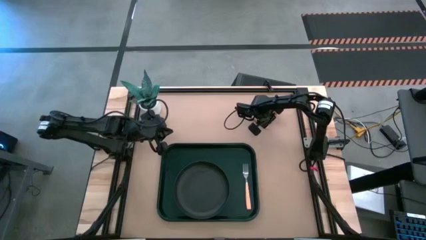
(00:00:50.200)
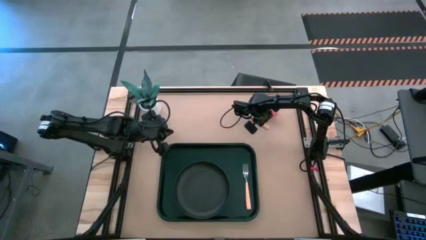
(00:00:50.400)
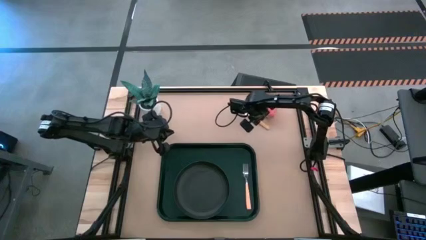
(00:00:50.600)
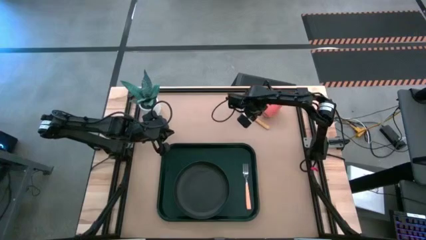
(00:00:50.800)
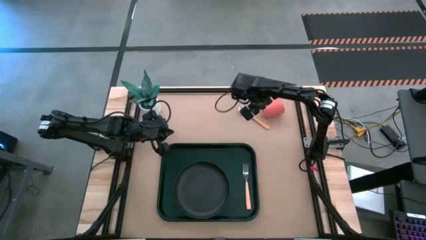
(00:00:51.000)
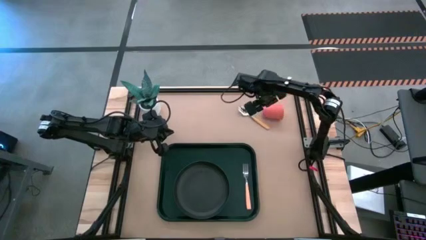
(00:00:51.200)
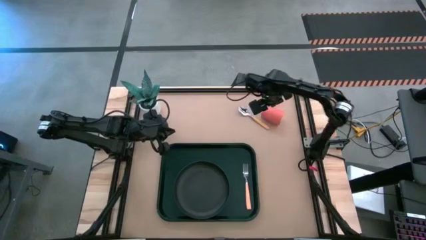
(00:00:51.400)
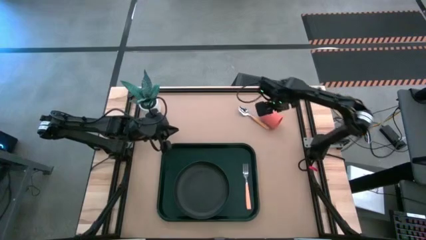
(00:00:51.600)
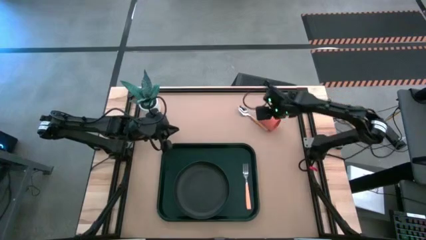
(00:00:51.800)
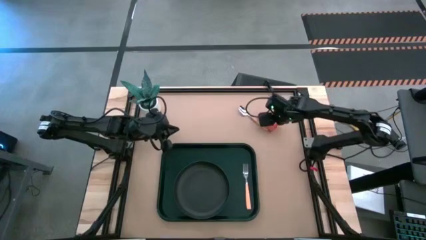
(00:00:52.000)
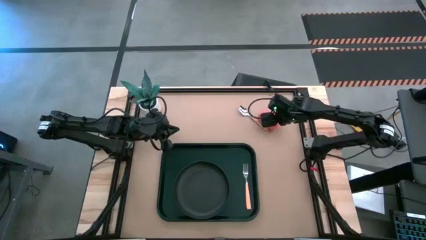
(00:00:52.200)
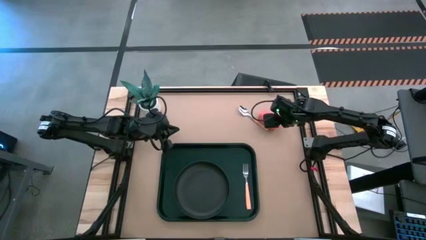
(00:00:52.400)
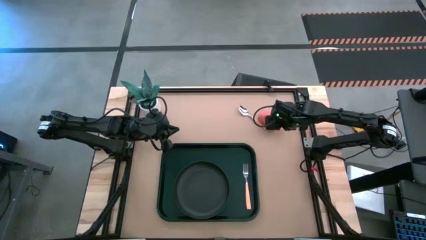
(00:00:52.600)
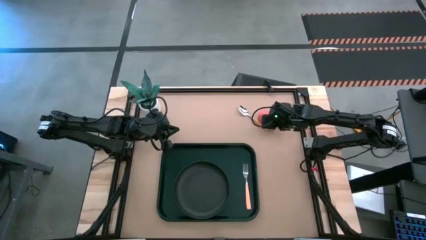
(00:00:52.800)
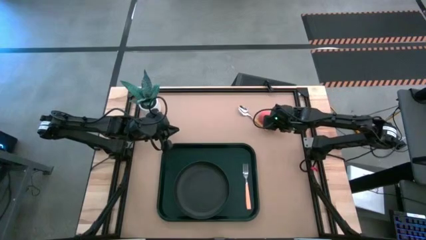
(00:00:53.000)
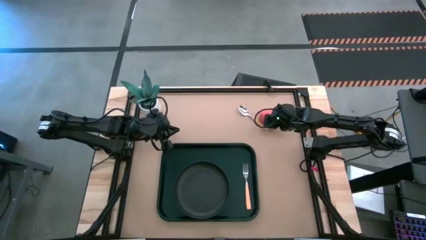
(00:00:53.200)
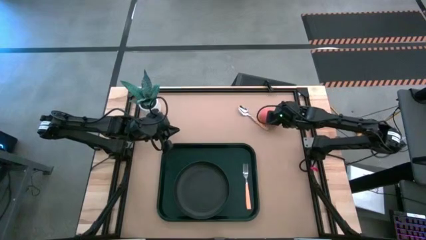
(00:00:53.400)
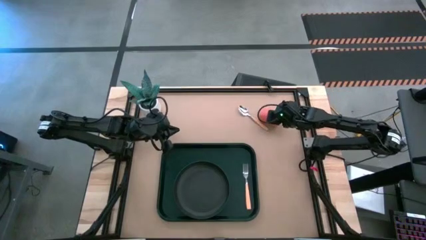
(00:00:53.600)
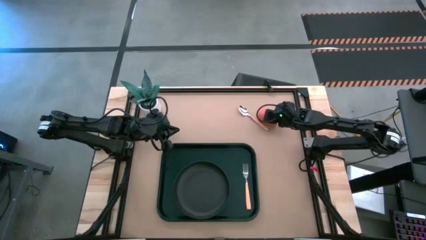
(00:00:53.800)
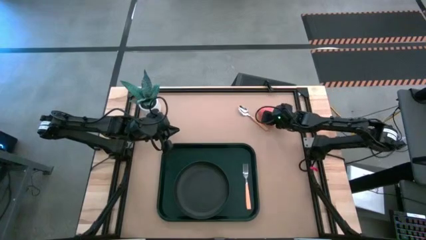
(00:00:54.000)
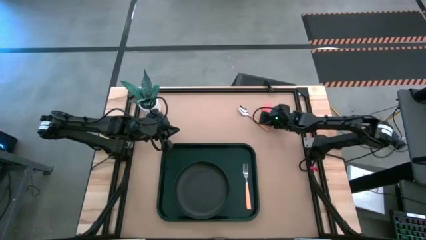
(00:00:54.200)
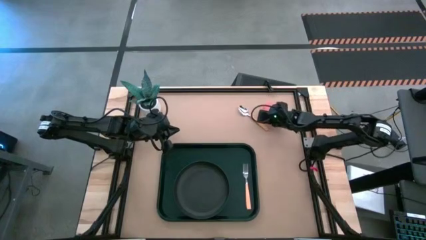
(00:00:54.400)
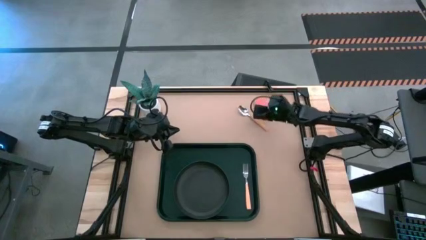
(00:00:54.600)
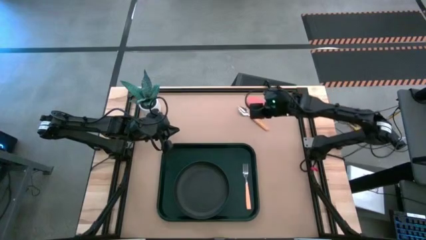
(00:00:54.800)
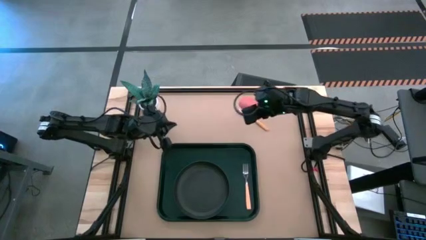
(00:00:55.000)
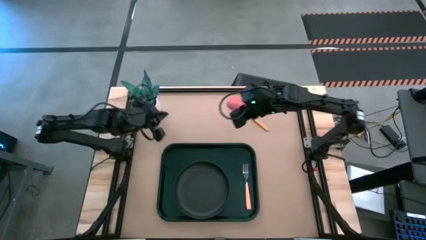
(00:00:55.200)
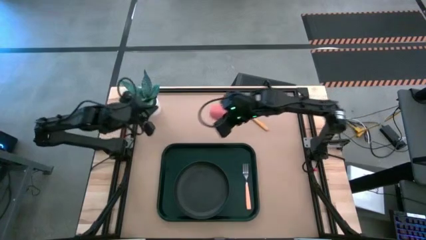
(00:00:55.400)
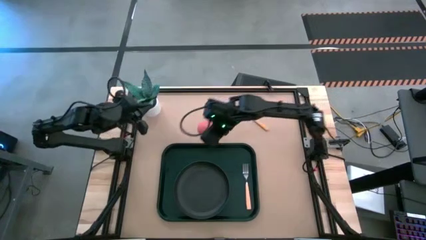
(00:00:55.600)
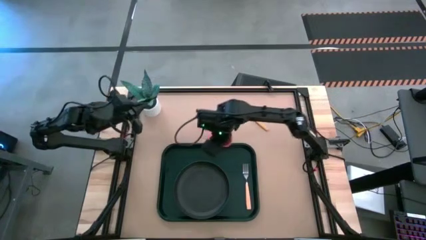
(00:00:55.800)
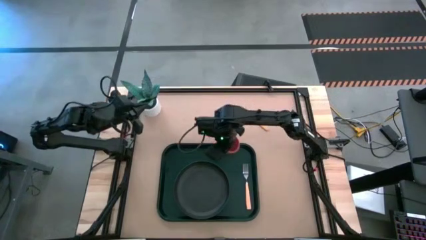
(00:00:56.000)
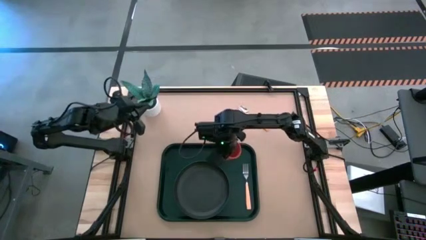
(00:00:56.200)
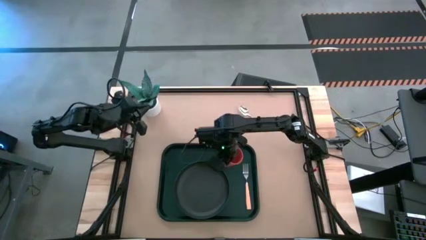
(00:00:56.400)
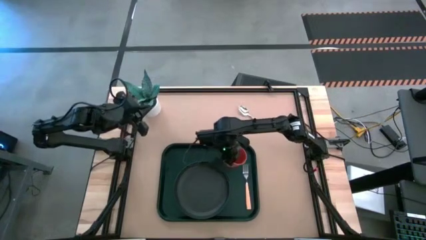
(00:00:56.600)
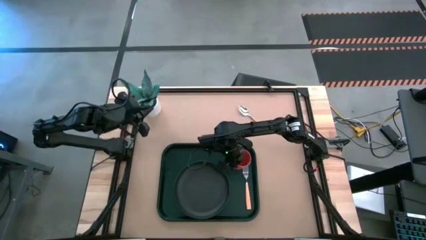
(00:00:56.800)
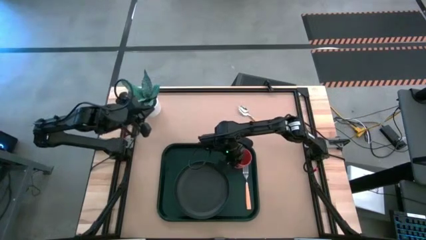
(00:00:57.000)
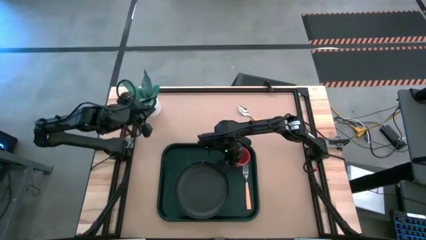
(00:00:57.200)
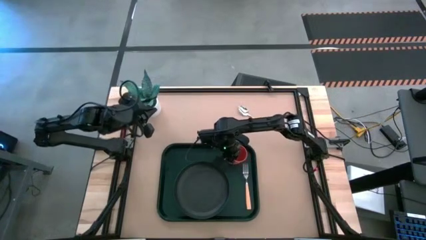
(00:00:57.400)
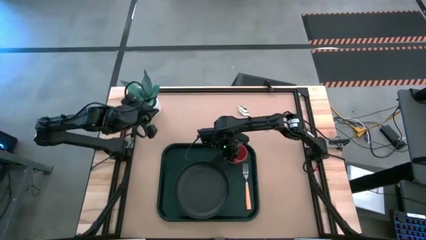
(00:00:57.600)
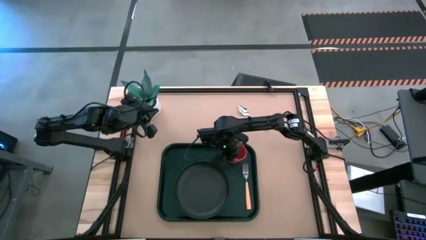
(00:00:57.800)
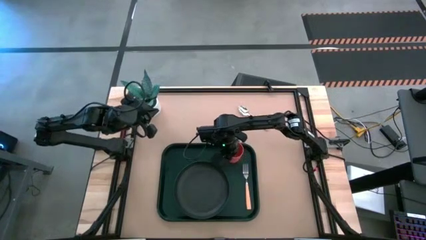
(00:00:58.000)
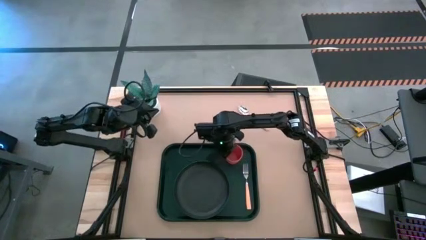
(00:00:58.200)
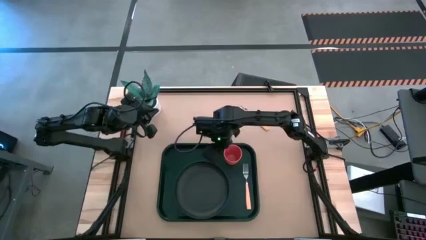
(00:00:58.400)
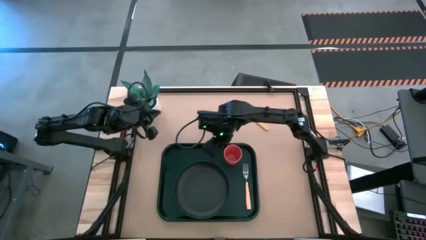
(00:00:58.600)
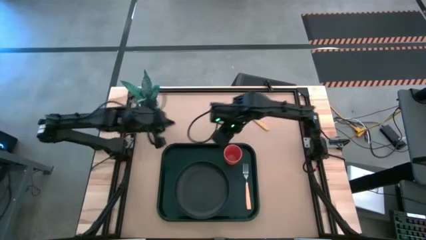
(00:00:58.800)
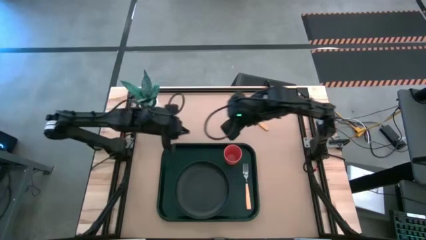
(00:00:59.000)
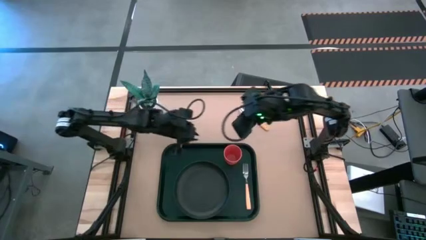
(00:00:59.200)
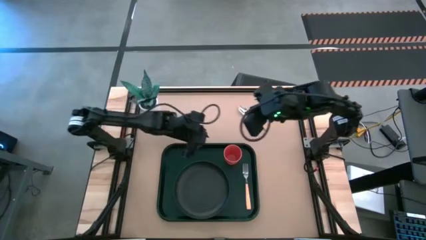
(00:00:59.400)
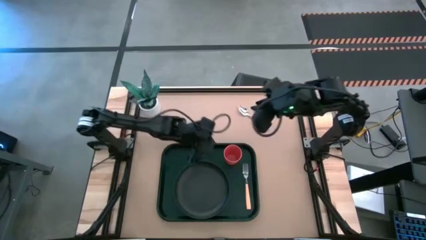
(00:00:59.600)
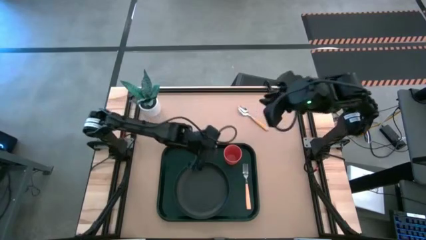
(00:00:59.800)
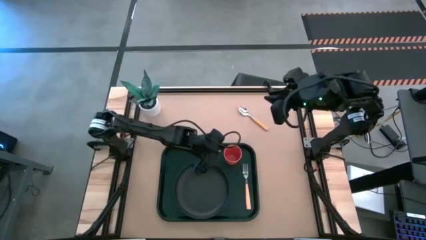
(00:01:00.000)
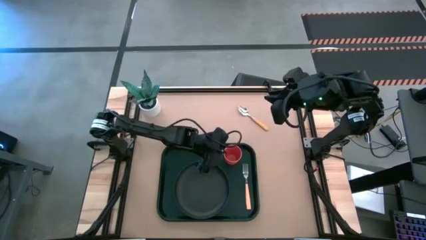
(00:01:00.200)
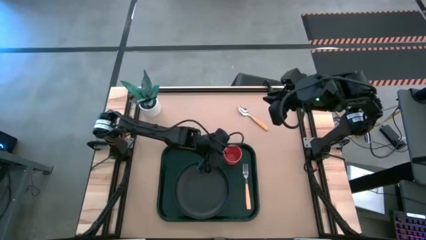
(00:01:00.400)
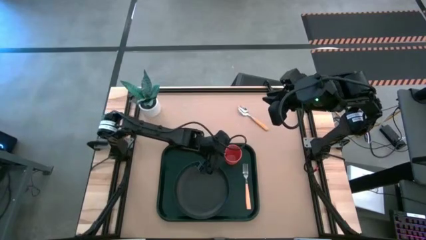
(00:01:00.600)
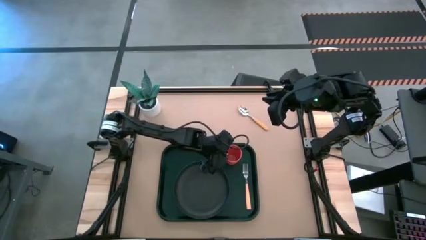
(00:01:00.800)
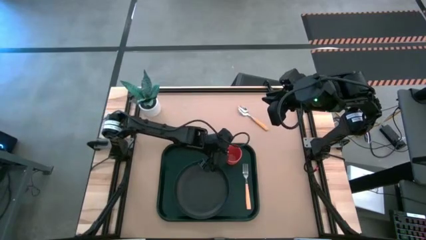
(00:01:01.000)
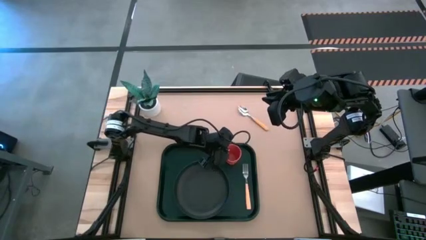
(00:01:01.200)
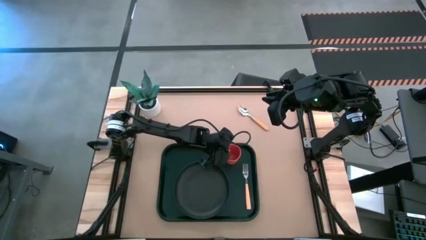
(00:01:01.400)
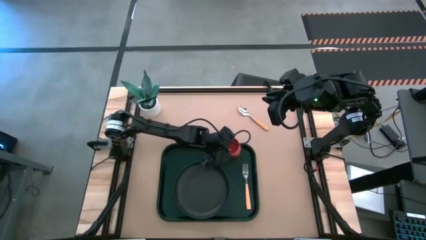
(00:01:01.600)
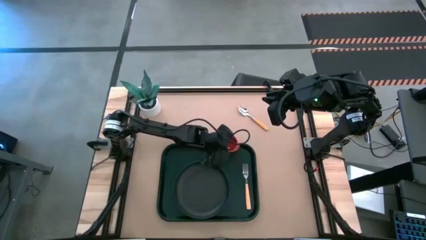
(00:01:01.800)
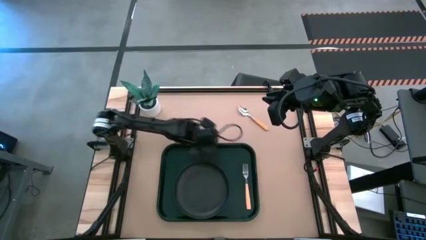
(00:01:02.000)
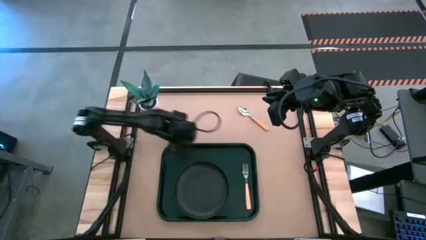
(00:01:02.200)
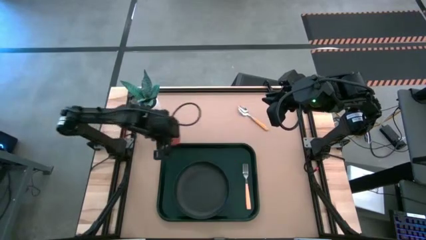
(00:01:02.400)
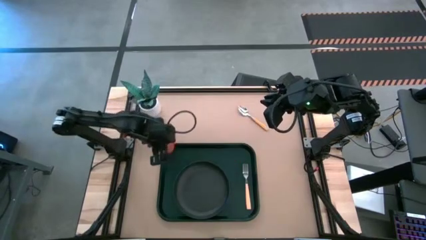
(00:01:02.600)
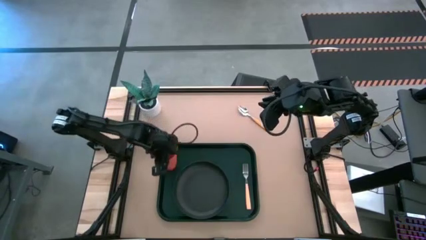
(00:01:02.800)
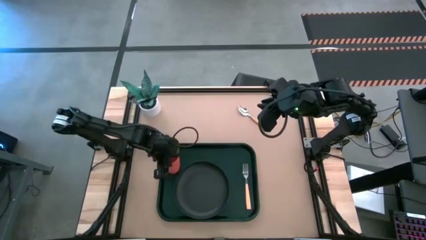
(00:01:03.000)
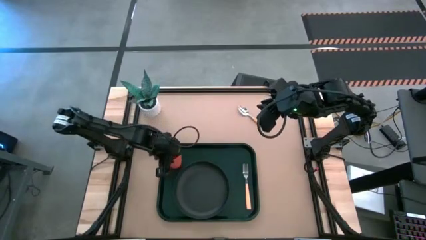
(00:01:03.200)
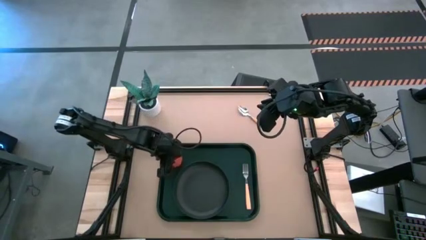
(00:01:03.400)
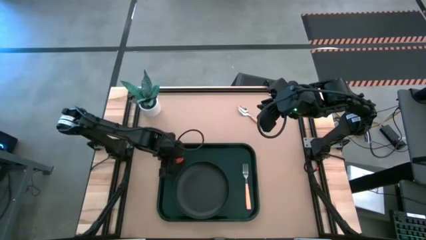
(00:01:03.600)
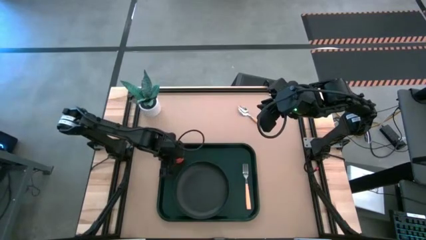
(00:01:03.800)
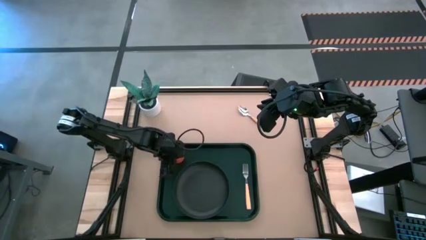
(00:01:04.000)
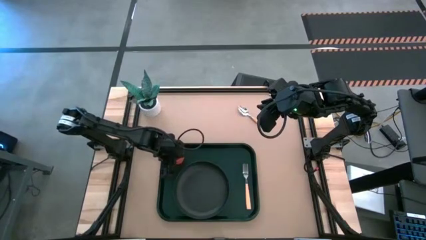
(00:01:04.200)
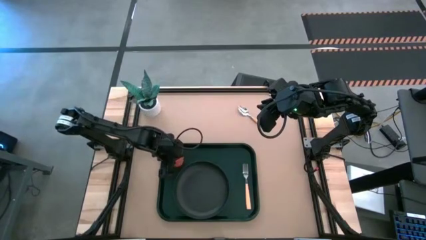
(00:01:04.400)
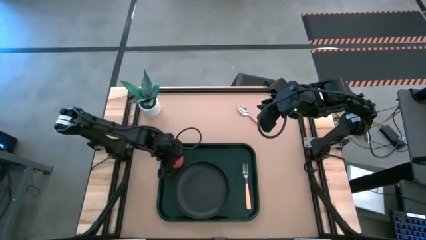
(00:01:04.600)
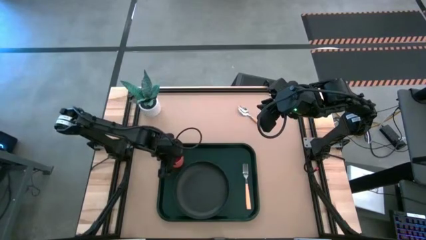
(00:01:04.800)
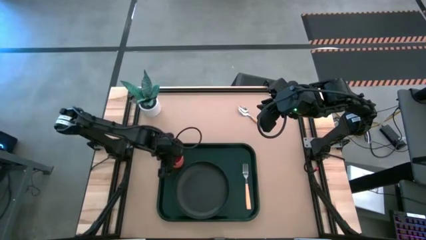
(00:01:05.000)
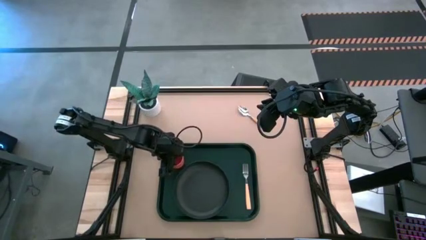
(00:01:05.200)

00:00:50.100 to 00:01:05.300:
Task: Pick and place plate/cup/fork/spoon on tray
Put the orange cup on the black serving tray to the top right of the black plate
